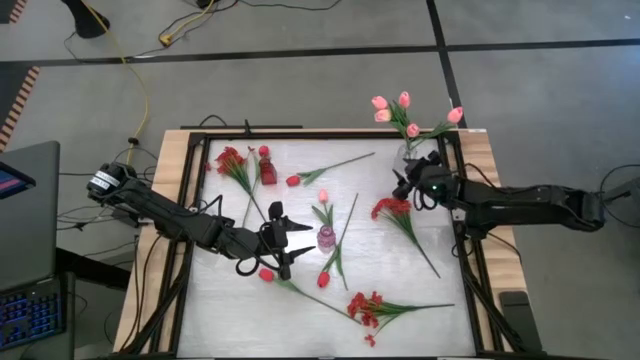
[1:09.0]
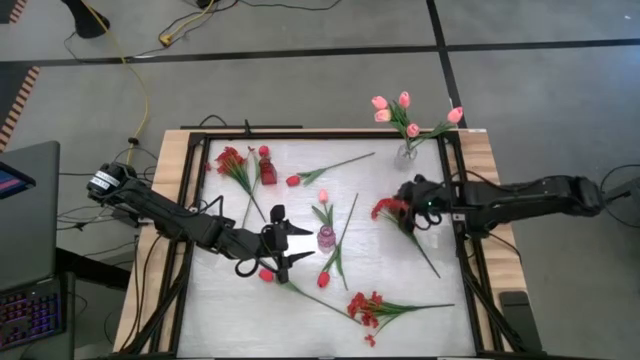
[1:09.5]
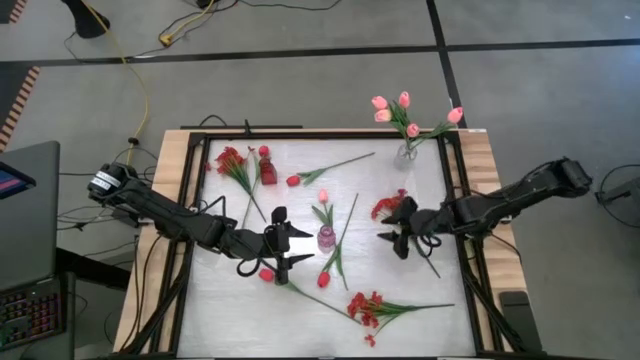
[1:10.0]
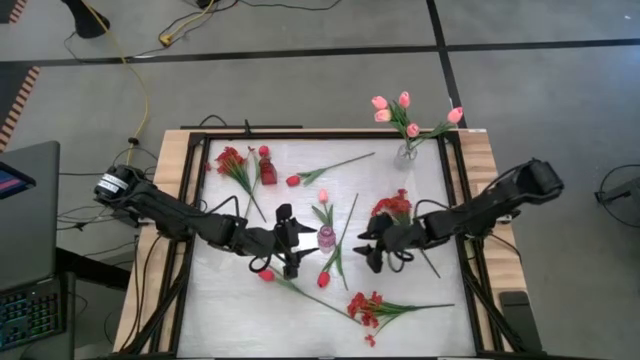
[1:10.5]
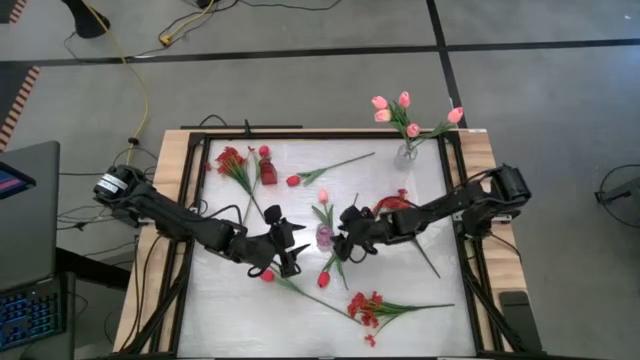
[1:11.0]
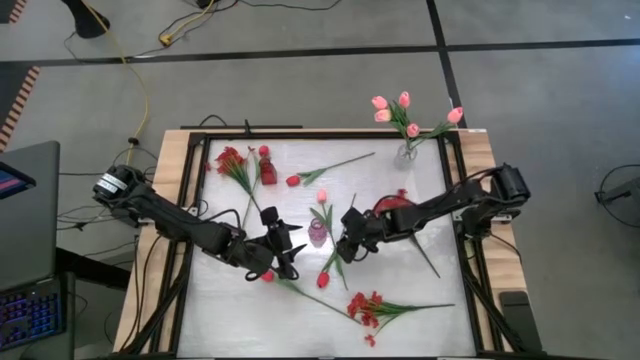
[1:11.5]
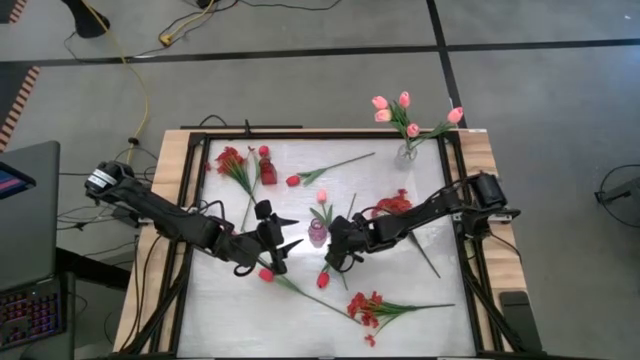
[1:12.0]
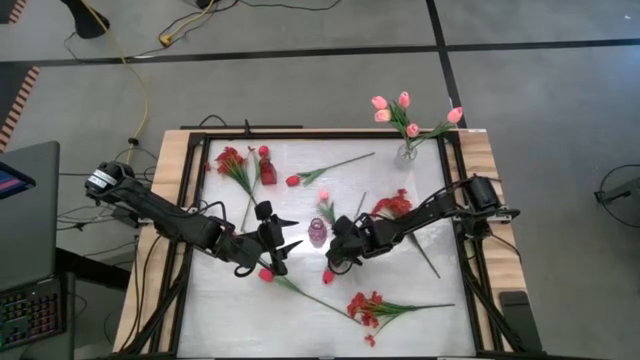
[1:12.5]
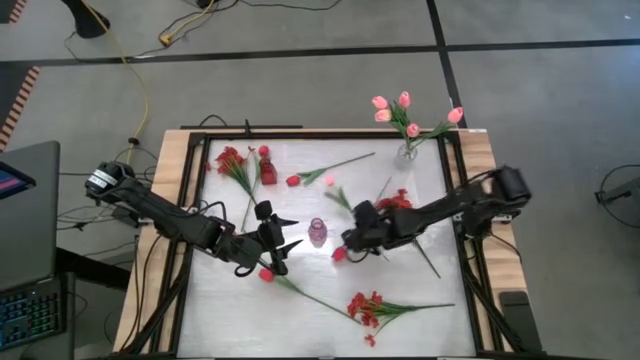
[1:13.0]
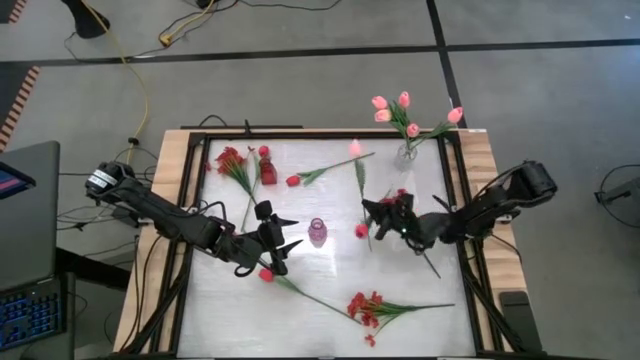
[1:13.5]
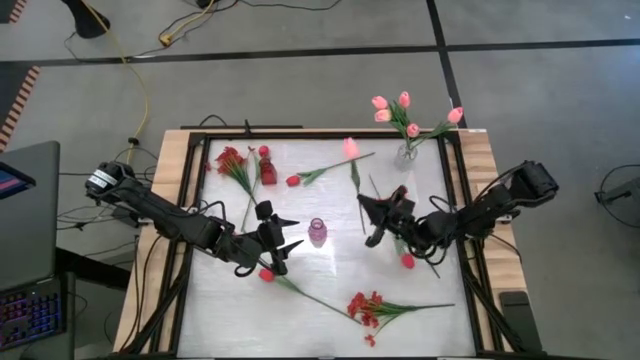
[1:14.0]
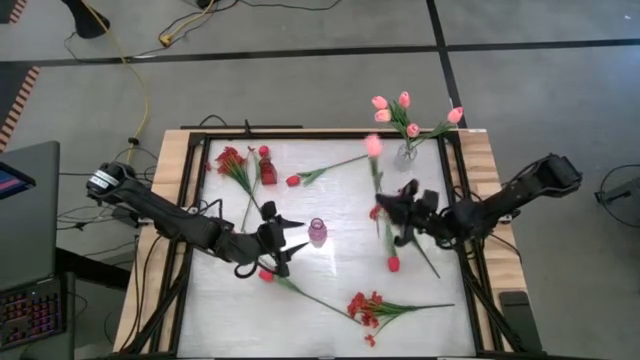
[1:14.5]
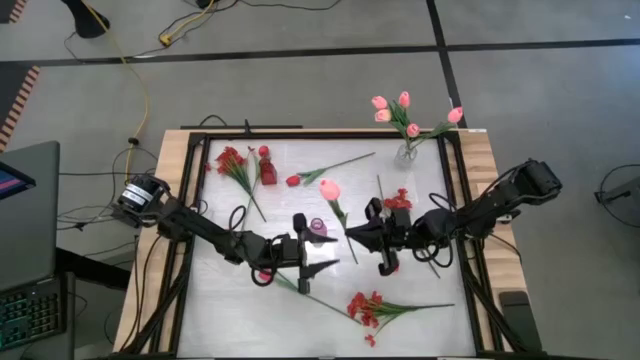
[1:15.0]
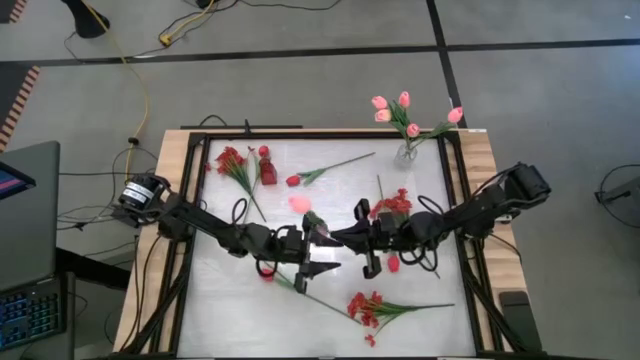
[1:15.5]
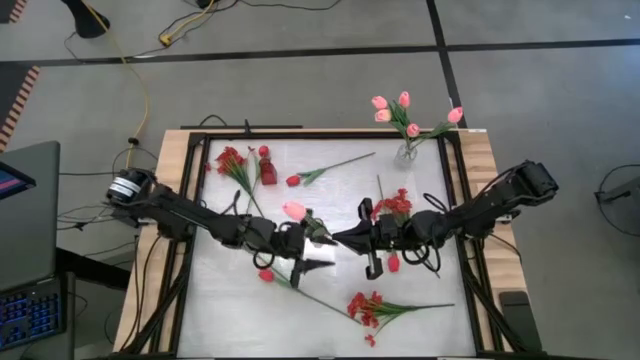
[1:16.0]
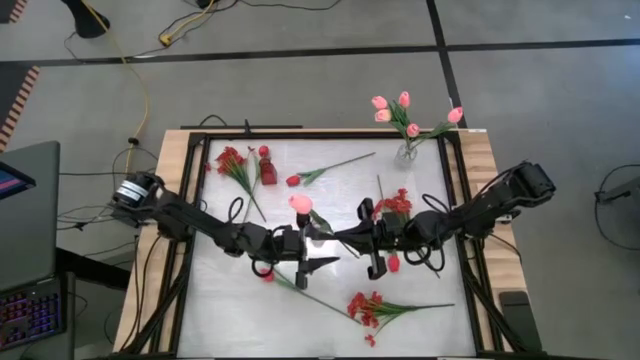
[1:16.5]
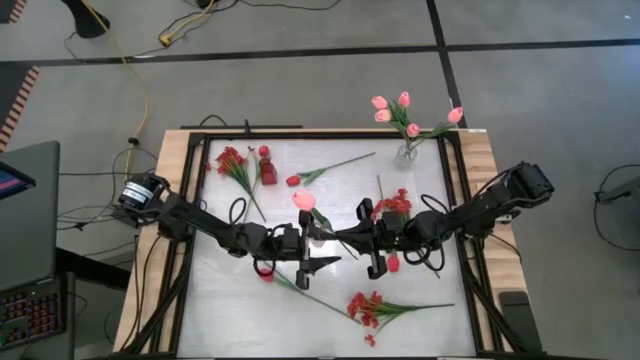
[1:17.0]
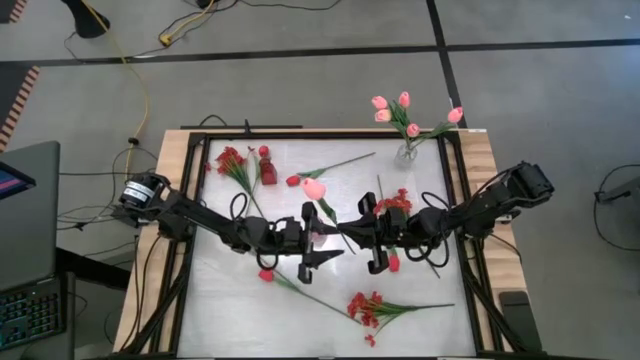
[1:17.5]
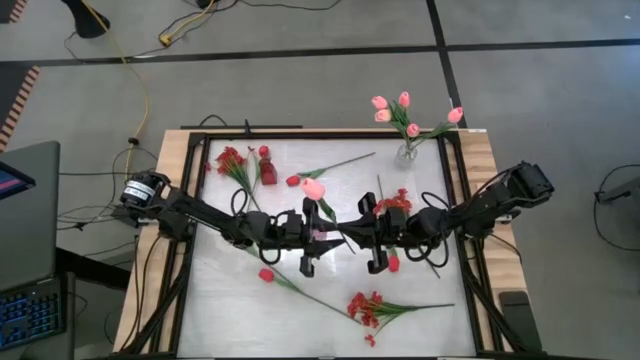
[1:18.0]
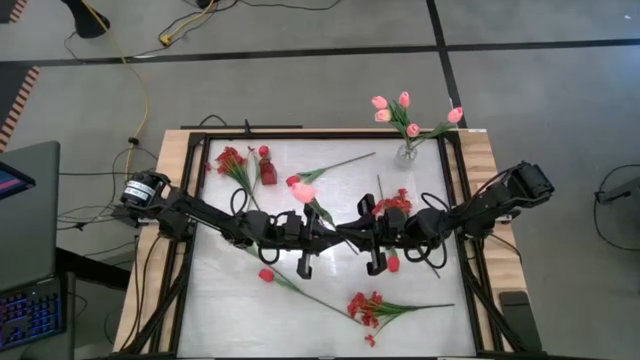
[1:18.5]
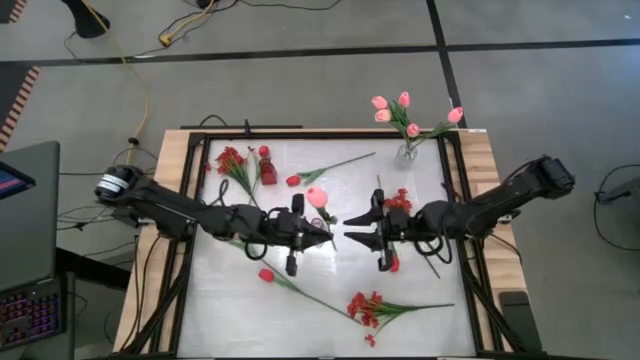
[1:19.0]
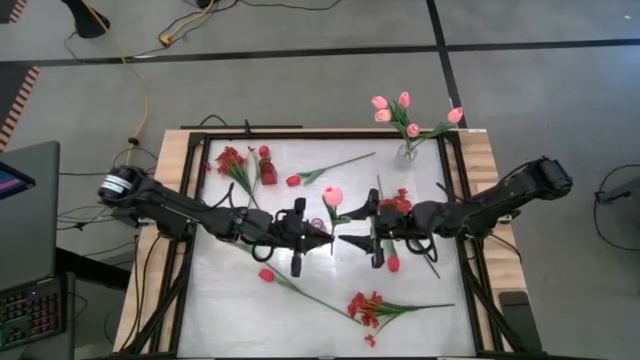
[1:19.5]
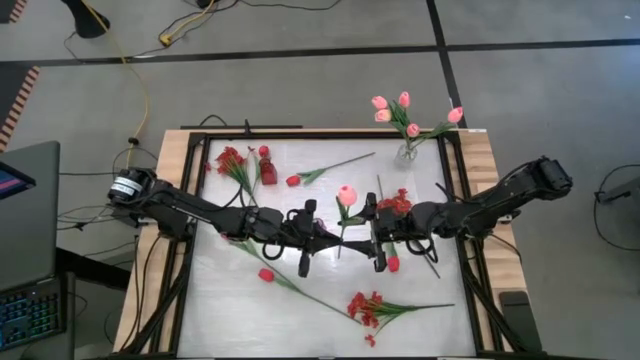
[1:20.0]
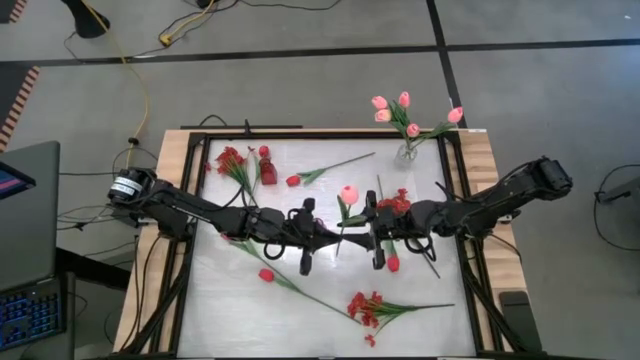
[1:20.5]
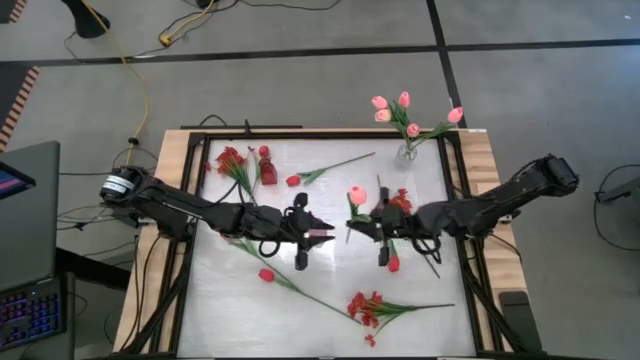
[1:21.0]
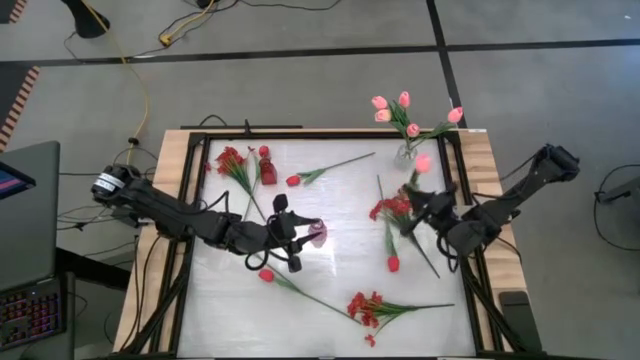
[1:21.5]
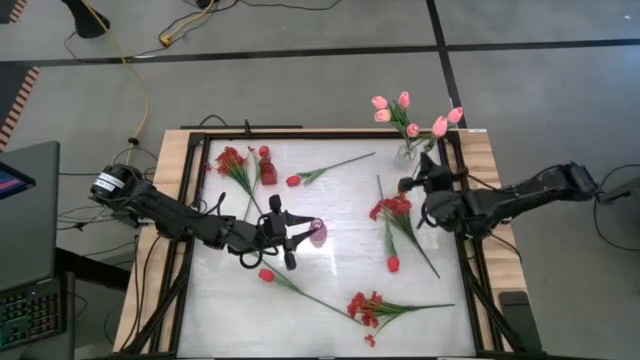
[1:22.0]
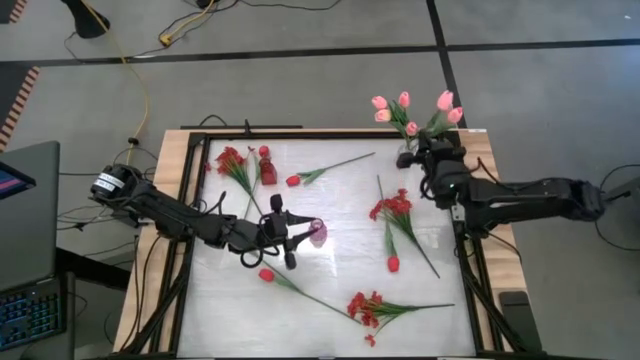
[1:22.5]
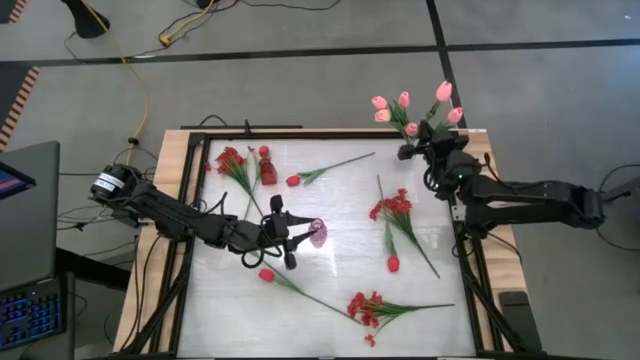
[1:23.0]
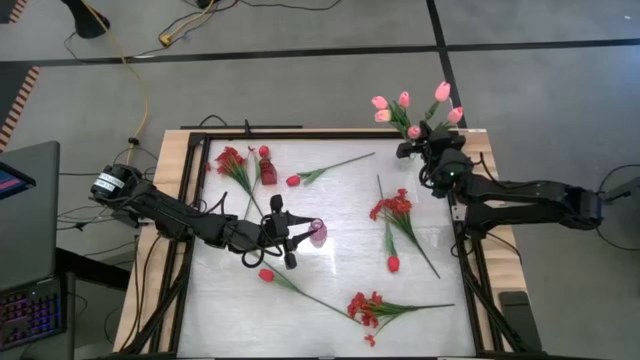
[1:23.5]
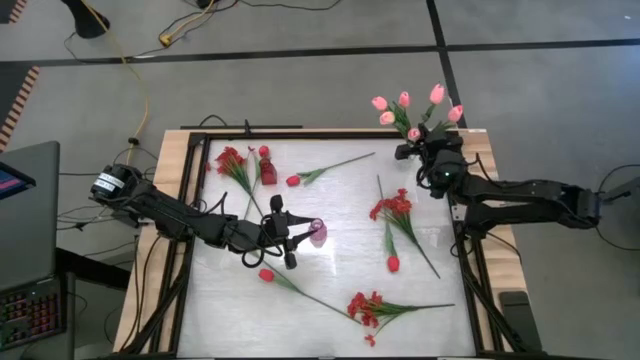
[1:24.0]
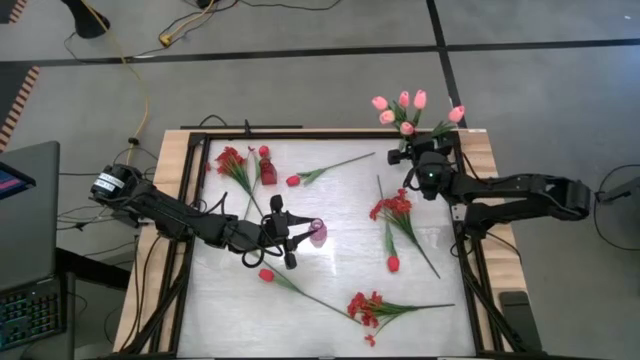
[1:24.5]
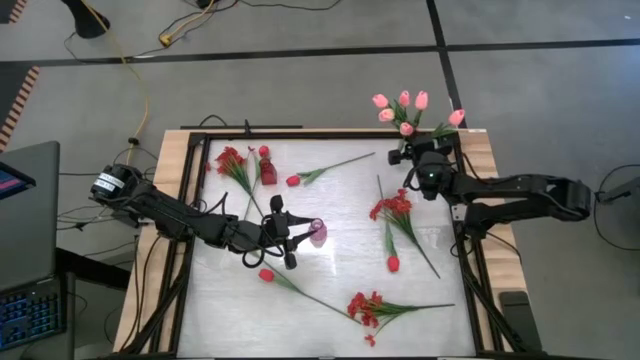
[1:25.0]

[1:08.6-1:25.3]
Task: Sort flowers into vase by color
Put the pink flower into the transparent vase

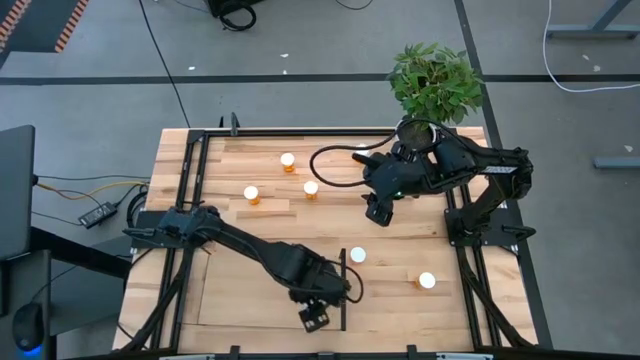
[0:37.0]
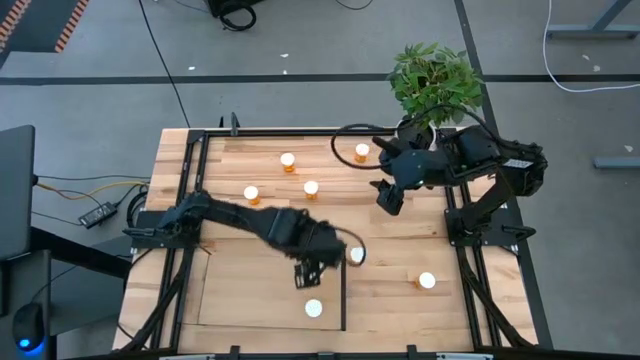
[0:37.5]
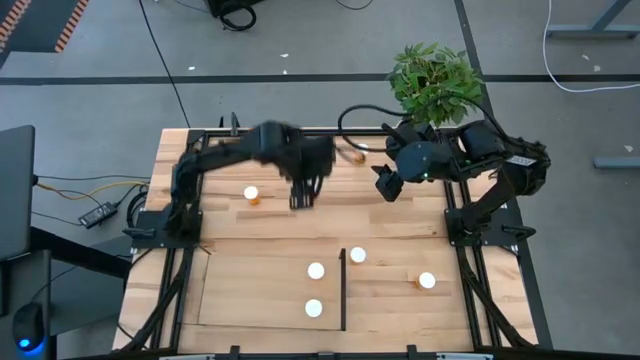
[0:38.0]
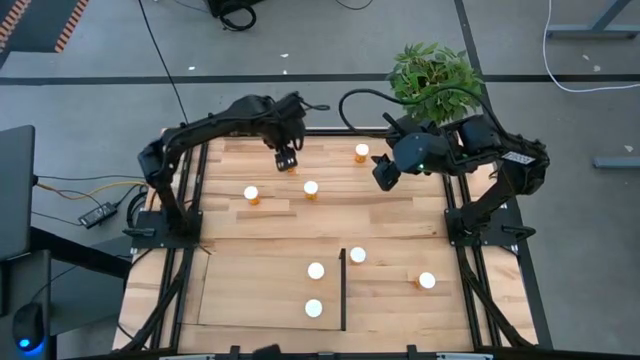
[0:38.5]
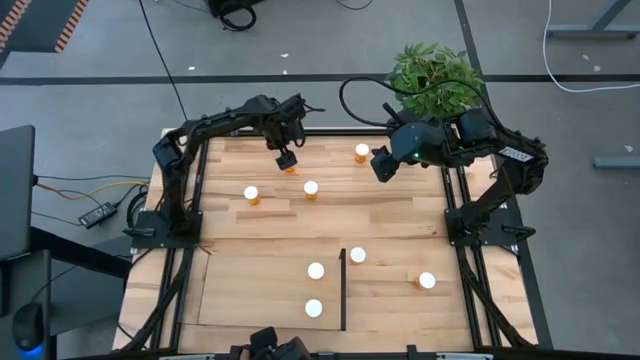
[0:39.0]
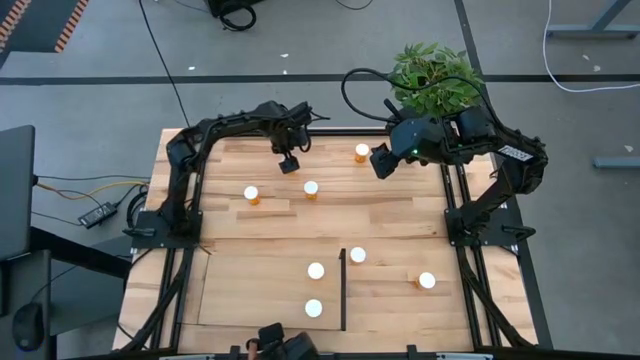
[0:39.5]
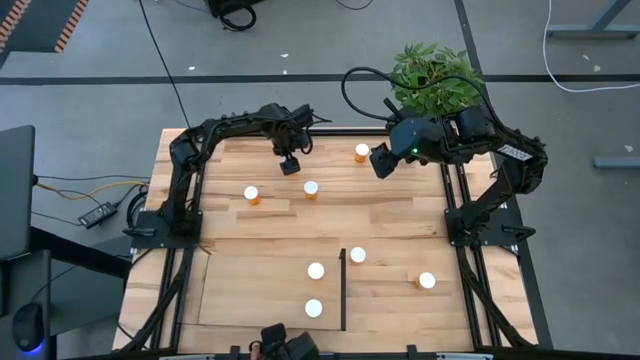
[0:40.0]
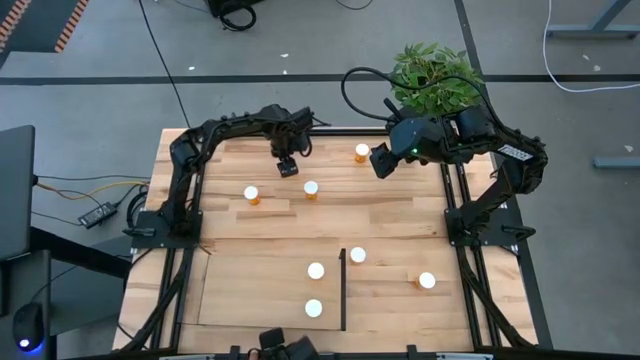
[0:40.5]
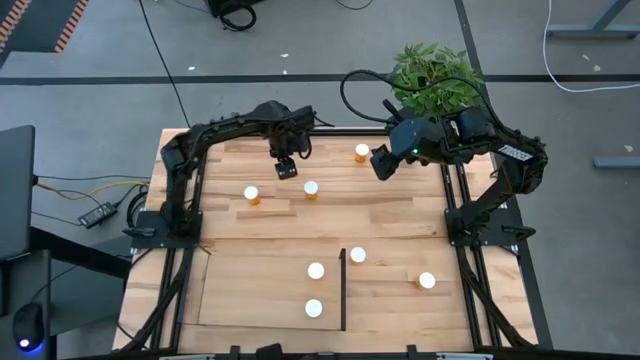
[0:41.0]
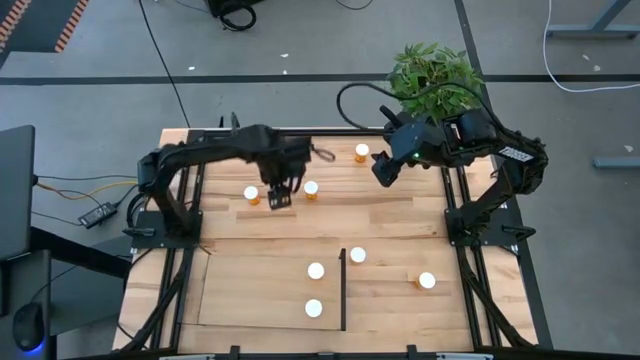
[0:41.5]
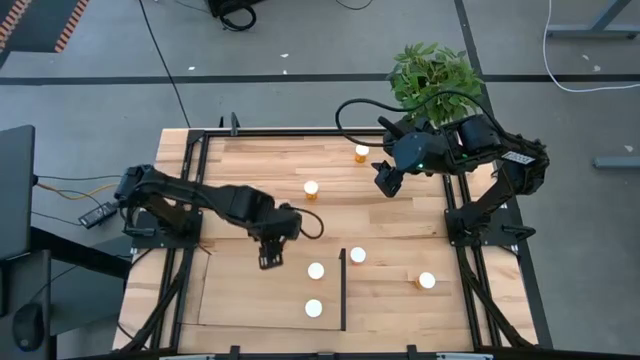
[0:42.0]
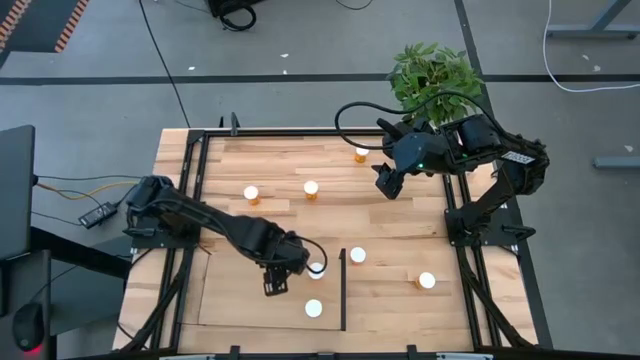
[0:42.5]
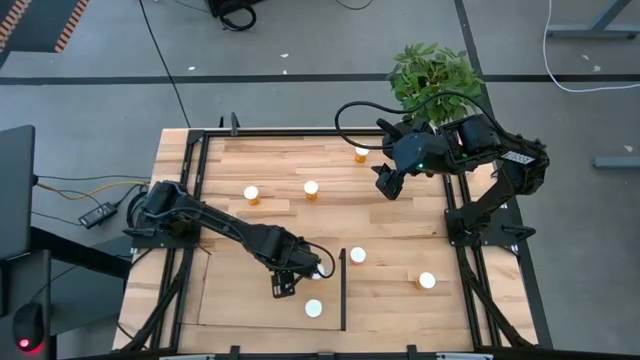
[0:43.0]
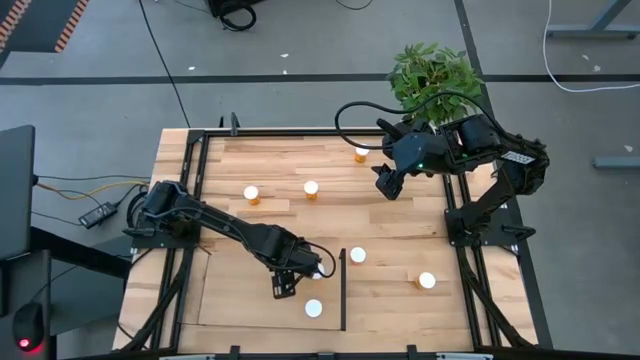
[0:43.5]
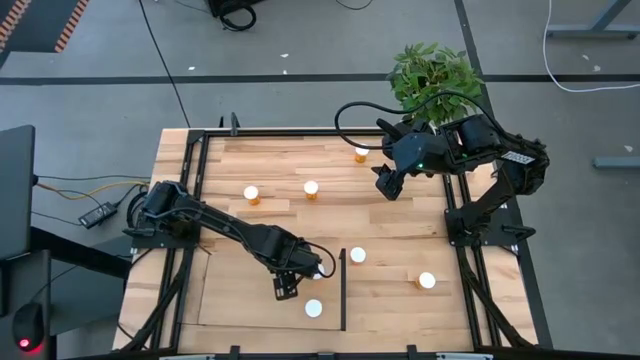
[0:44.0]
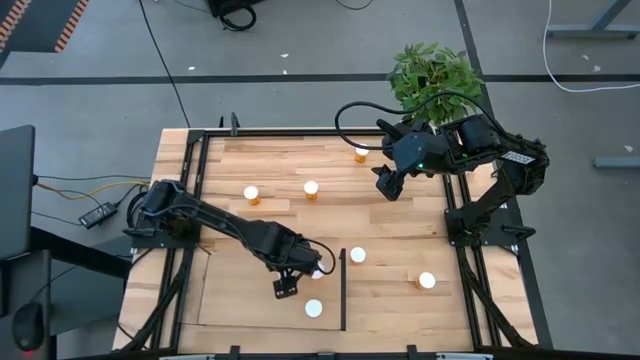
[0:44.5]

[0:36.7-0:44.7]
Task: Pick and place medicine bottles onto shelf by color
Put the orange pill bottle on the shelf
